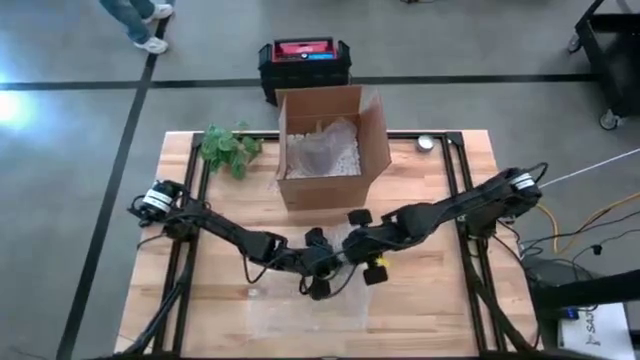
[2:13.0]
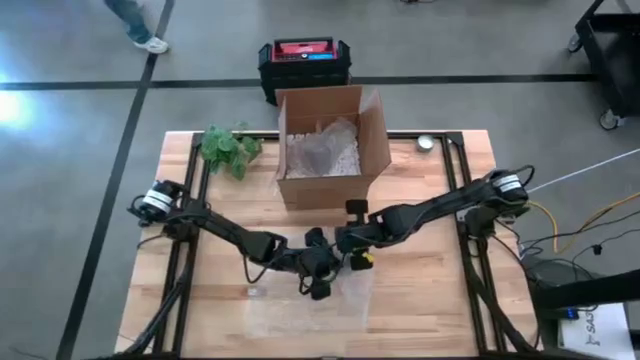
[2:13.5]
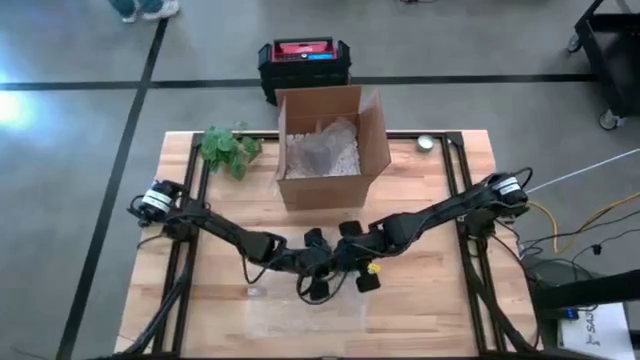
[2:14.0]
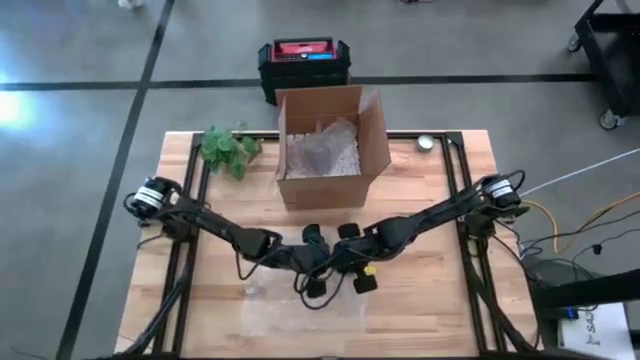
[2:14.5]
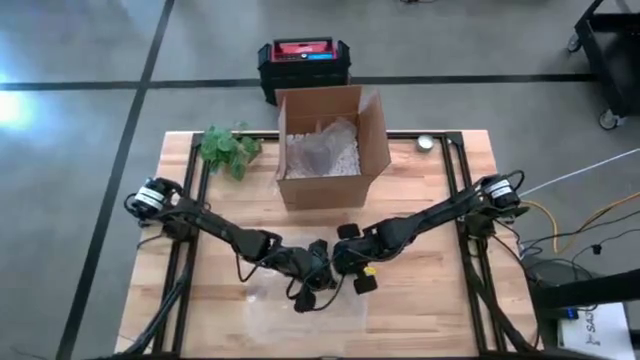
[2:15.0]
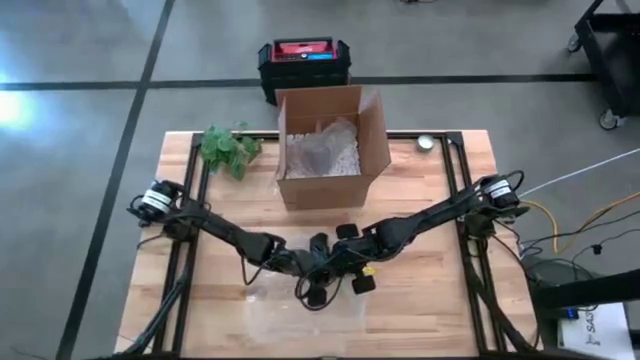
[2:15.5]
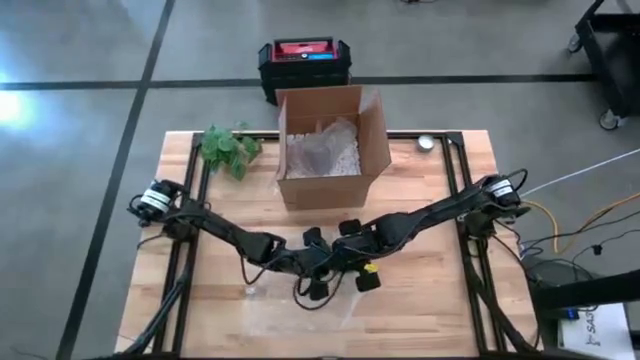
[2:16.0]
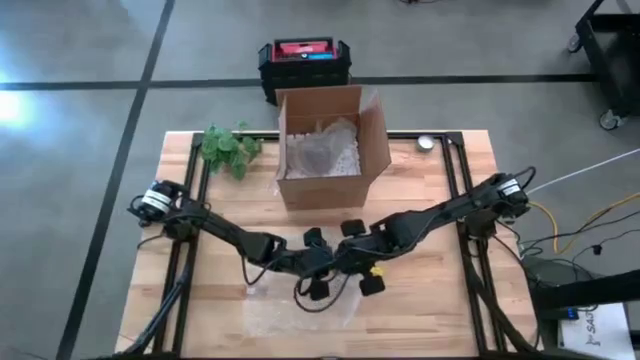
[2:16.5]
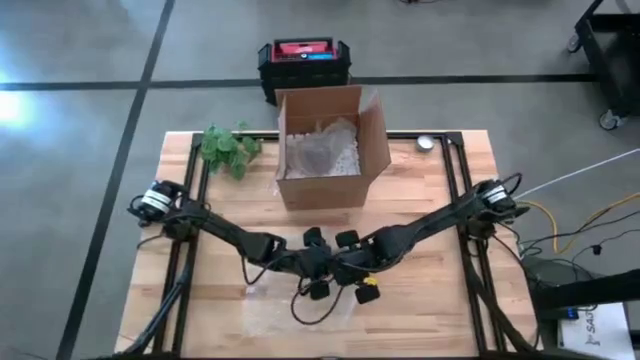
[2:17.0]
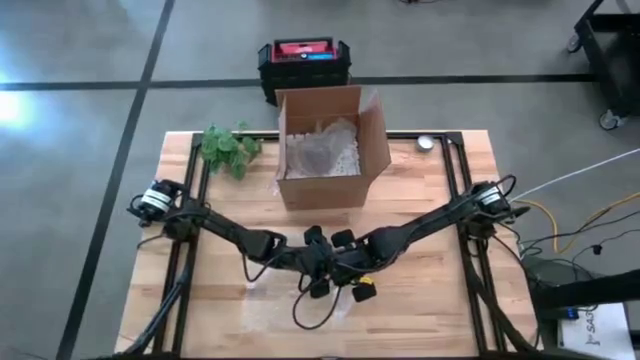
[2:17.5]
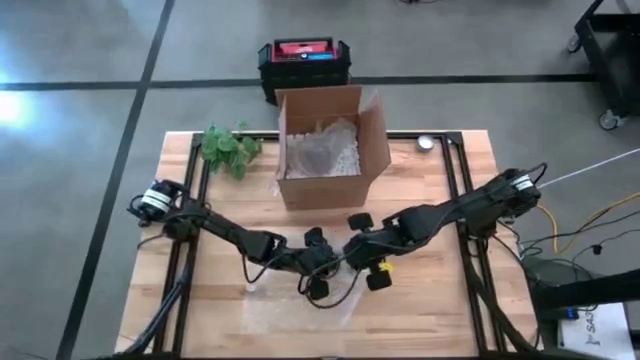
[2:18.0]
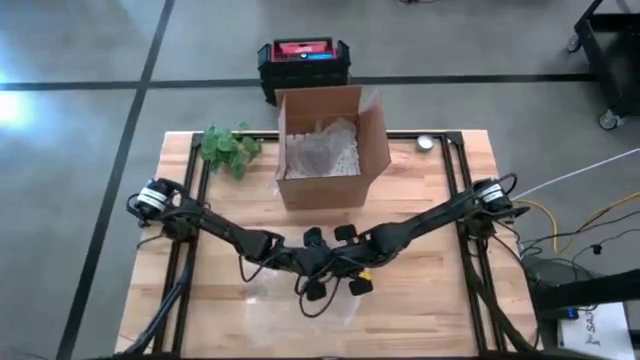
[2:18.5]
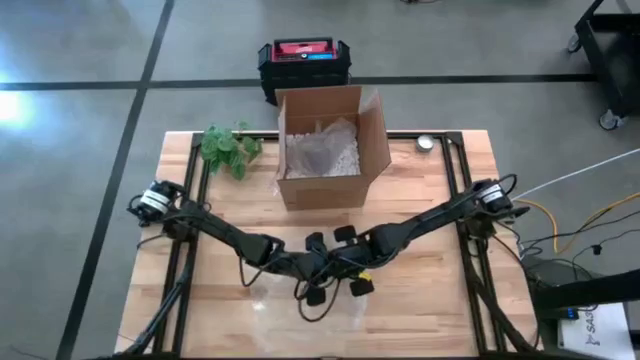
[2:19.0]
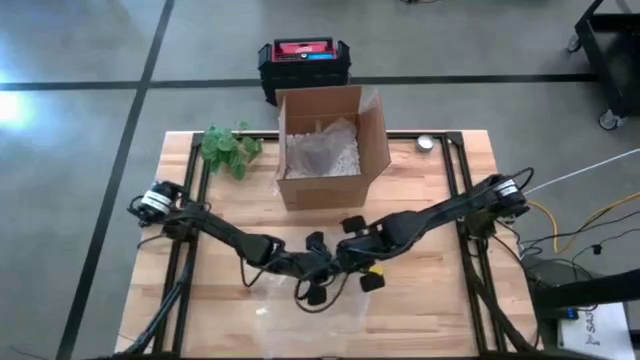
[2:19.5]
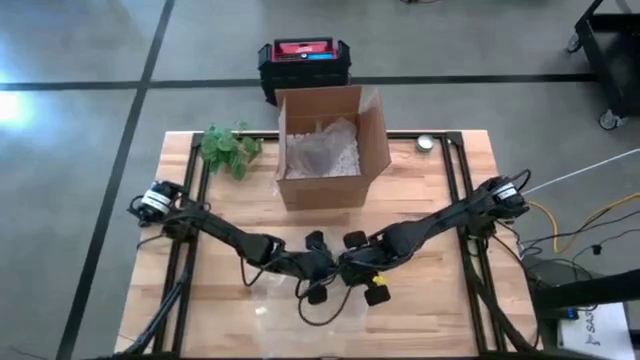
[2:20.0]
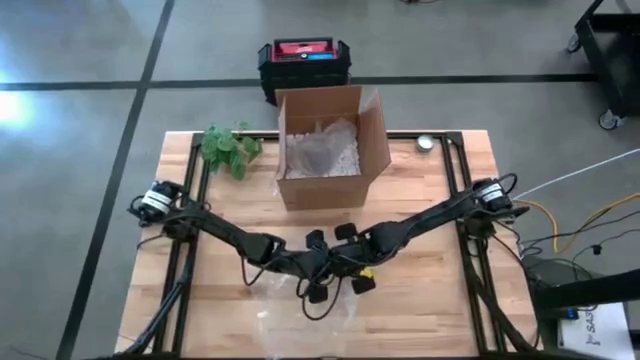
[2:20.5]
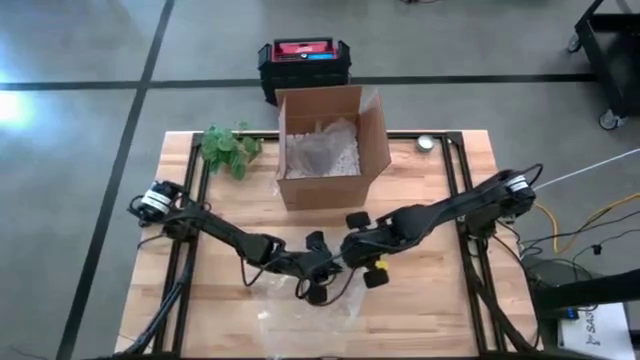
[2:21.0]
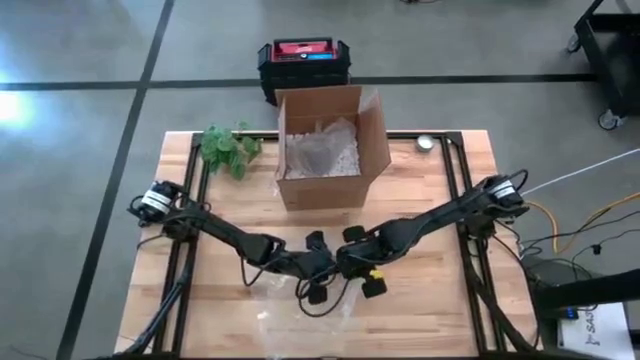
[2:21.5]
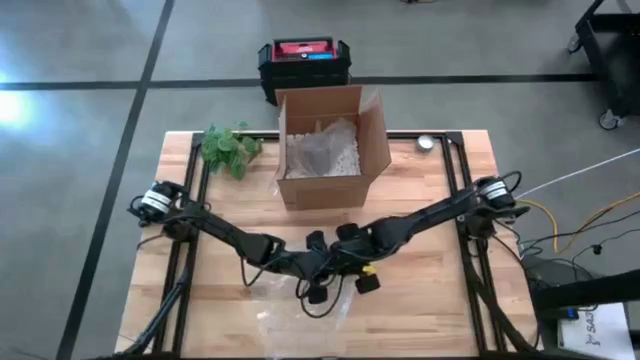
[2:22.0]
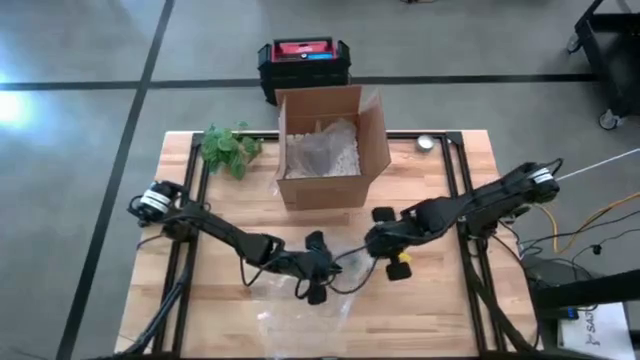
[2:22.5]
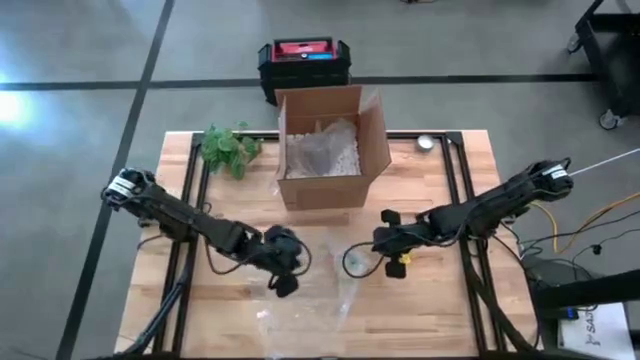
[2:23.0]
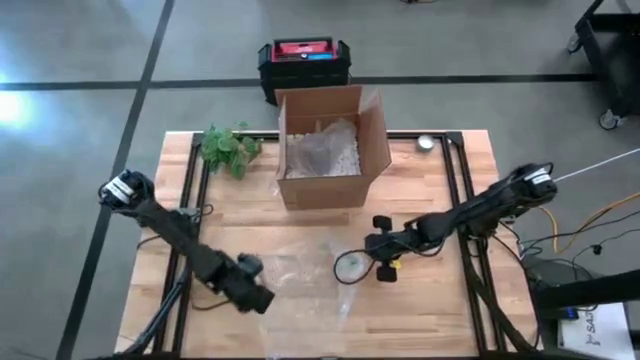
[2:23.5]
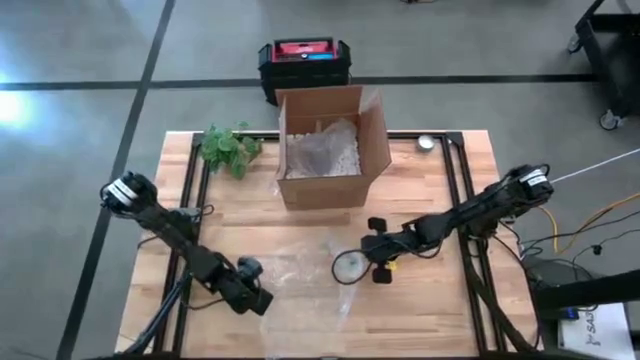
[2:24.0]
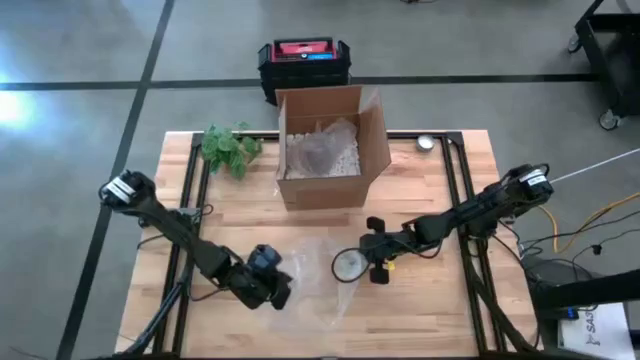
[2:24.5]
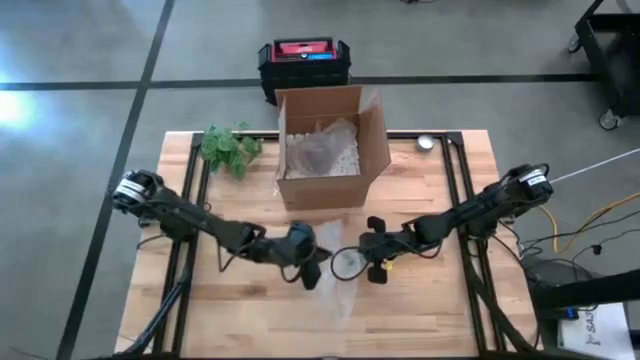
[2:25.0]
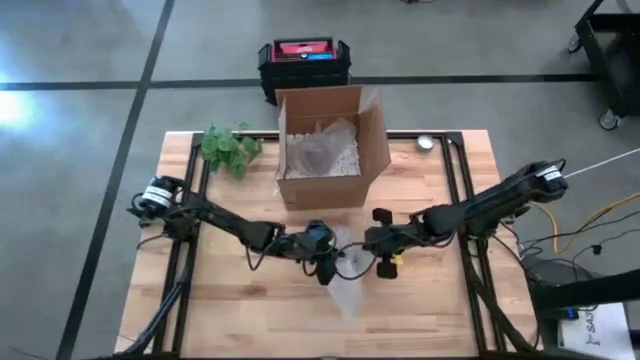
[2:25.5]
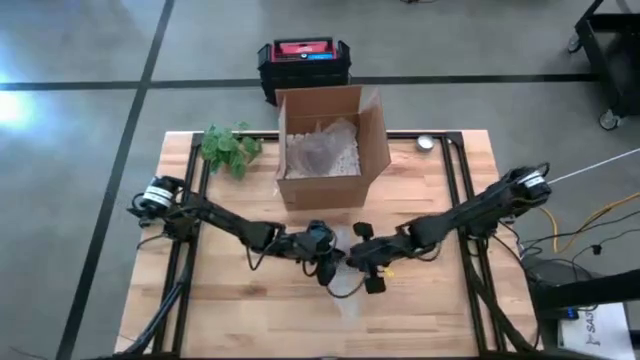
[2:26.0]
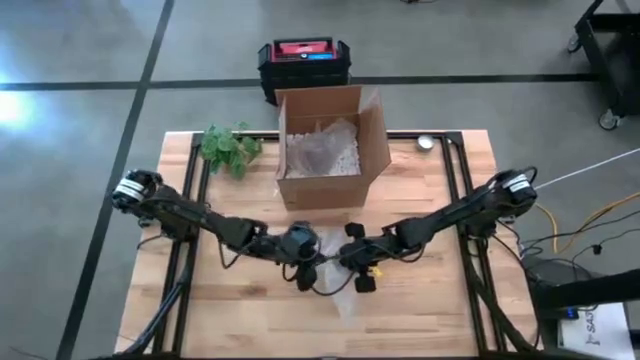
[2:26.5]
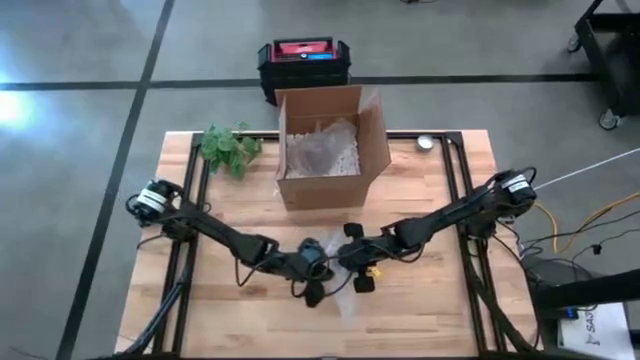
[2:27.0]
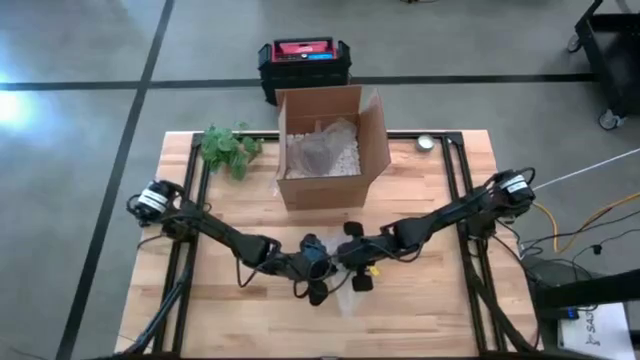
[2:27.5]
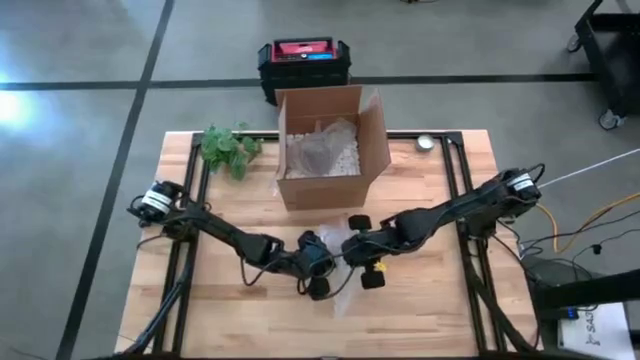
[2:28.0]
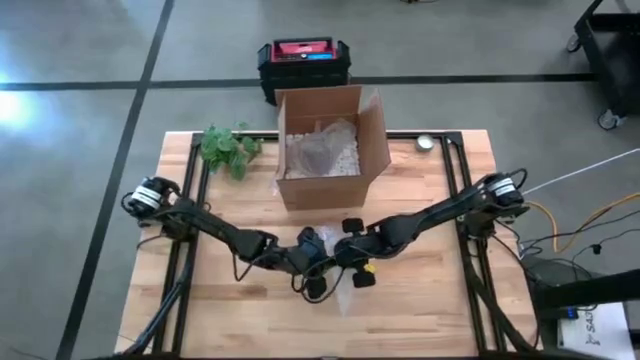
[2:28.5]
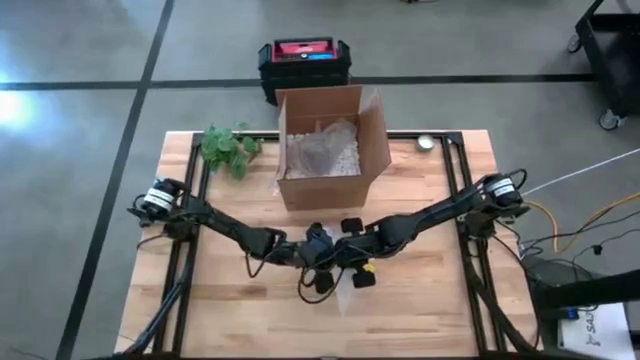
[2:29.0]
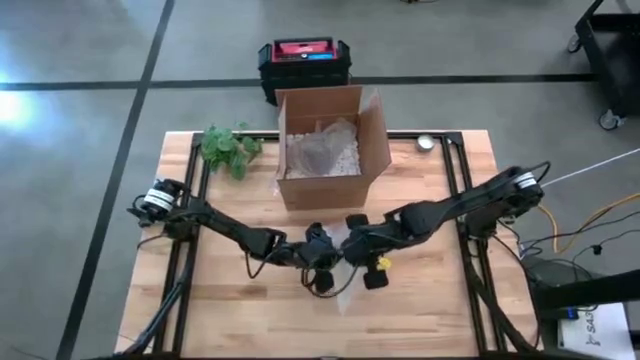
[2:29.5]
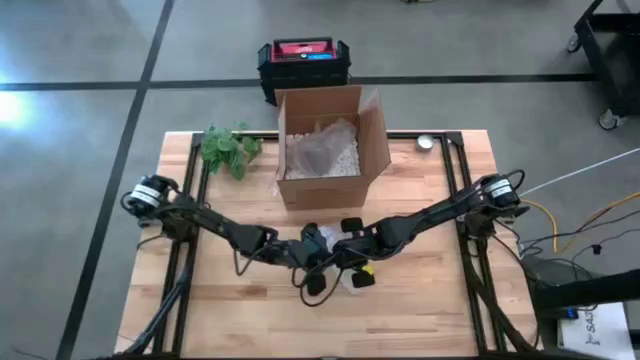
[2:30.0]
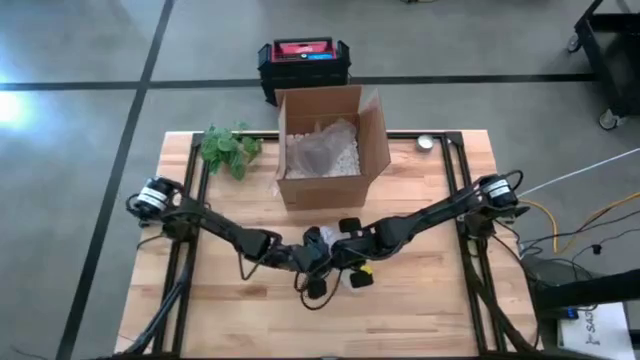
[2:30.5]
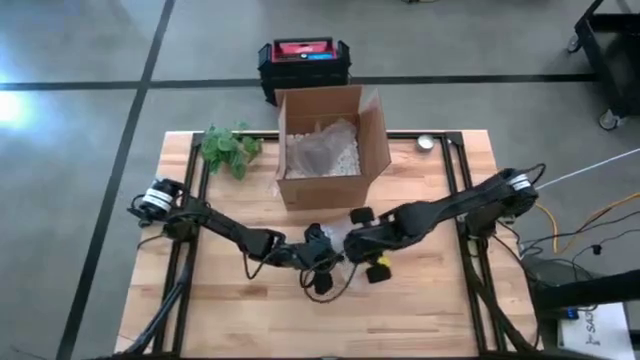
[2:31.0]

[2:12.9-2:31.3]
Task: wrap mug
Wrap the yellow mug with a bubble wrap

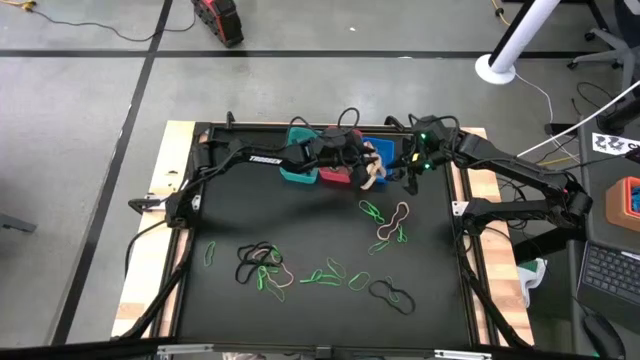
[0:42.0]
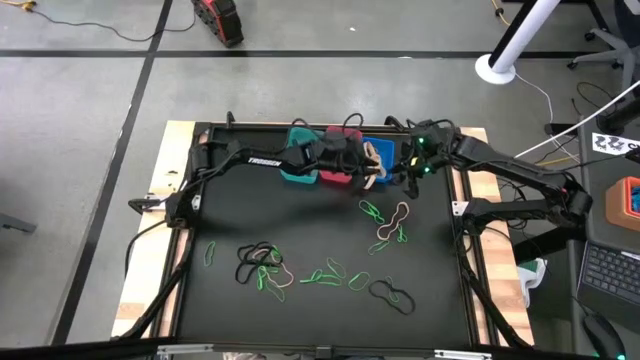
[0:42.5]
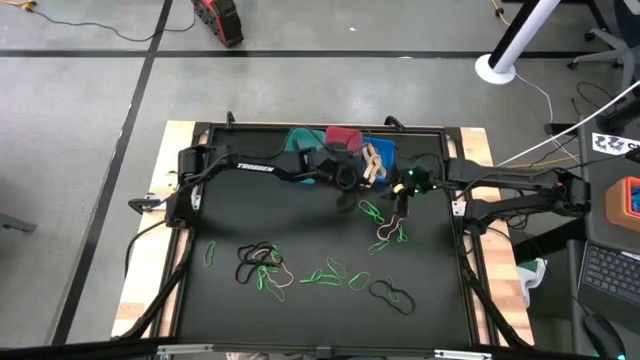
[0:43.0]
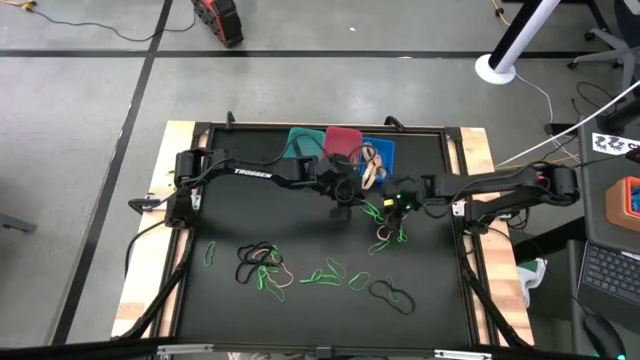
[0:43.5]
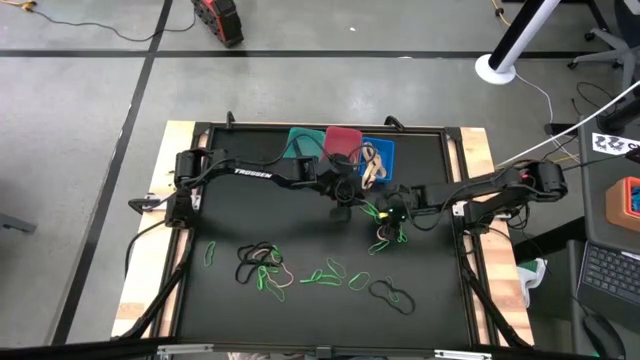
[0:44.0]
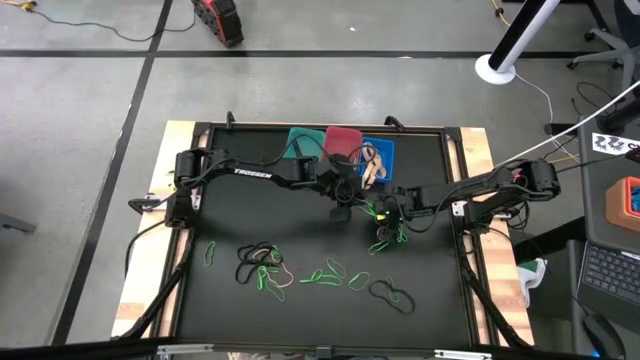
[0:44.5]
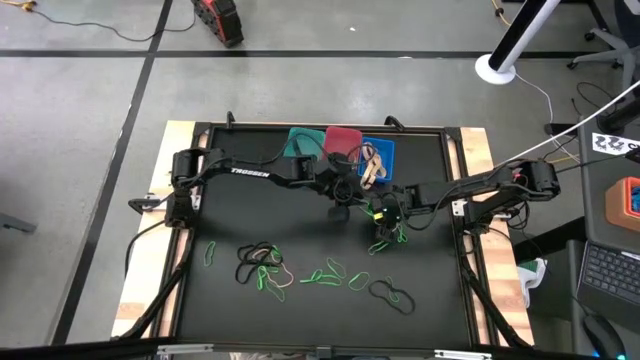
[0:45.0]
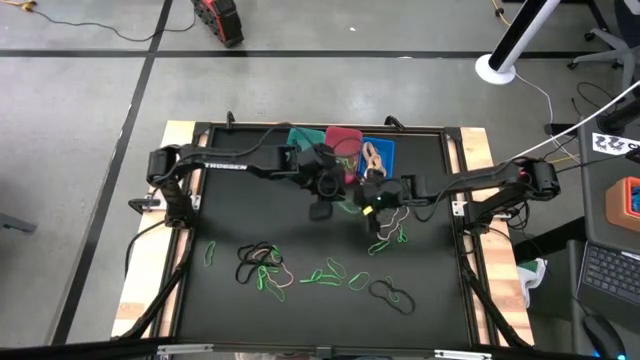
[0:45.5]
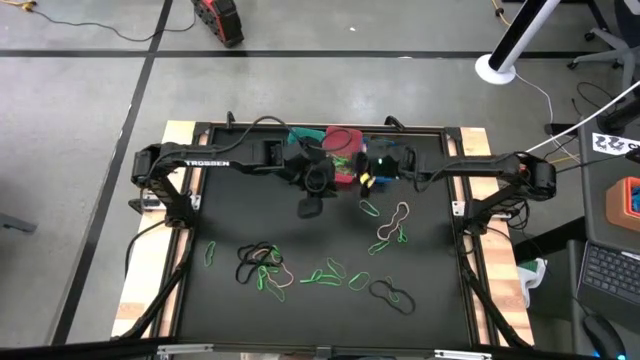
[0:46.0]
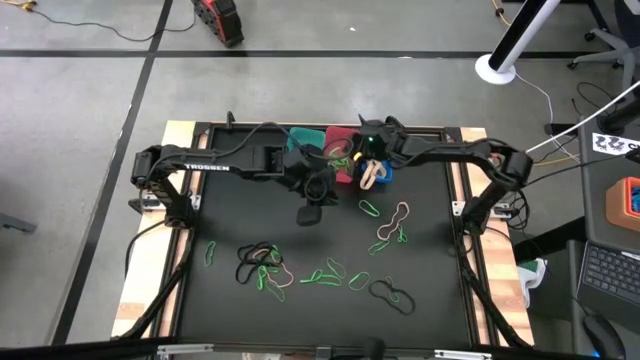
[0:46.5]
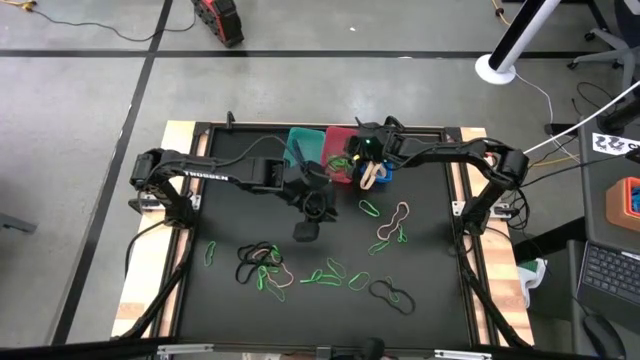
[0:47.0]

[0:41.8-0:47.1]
Task: Sort rubber bands into baskets
Put the green rubber band into the pink bin
